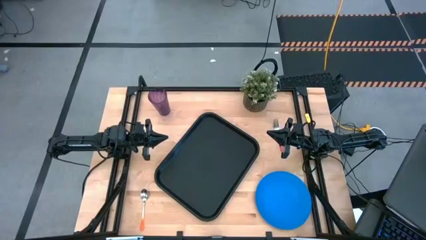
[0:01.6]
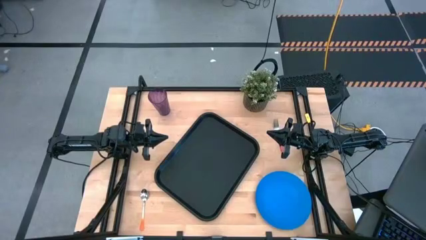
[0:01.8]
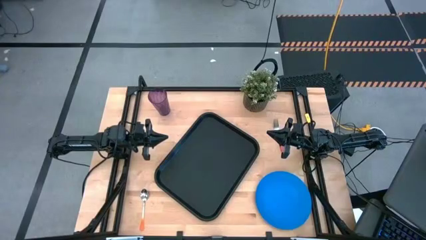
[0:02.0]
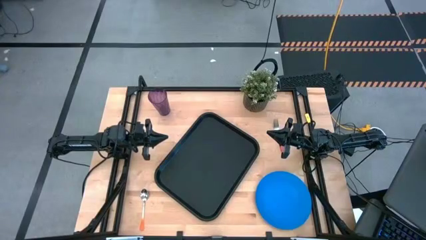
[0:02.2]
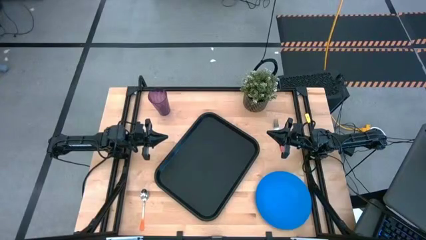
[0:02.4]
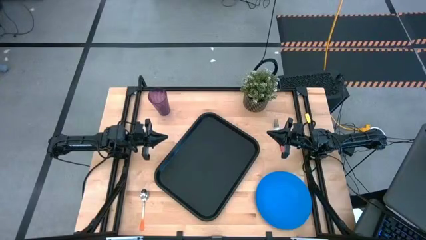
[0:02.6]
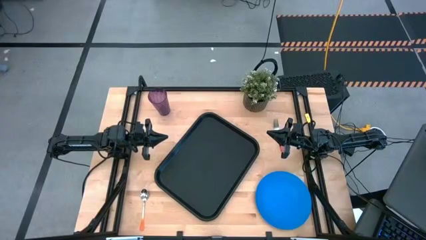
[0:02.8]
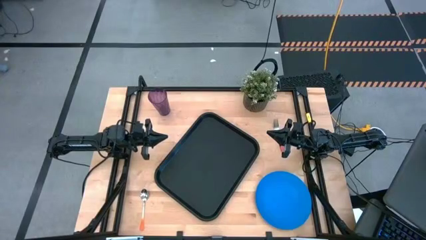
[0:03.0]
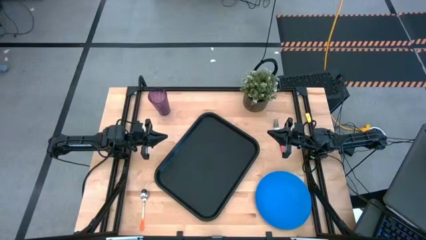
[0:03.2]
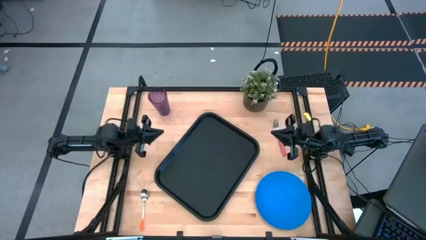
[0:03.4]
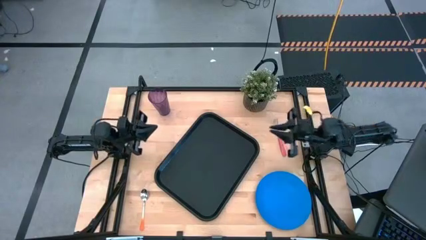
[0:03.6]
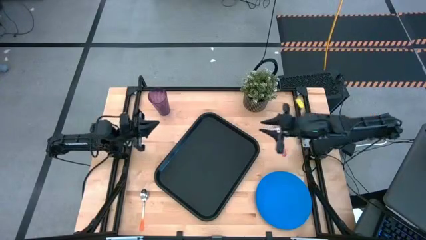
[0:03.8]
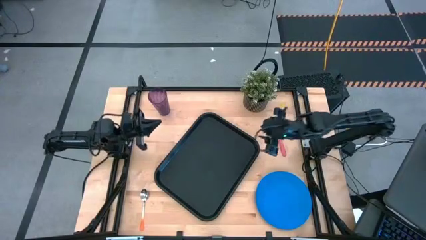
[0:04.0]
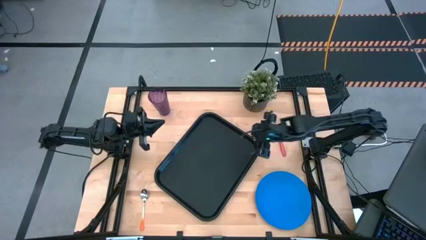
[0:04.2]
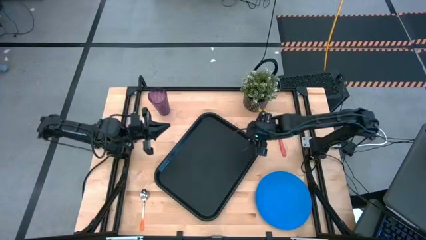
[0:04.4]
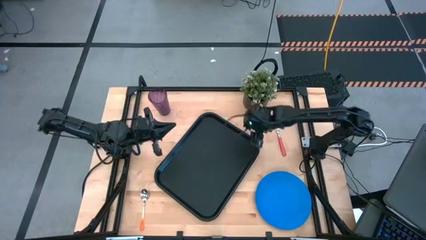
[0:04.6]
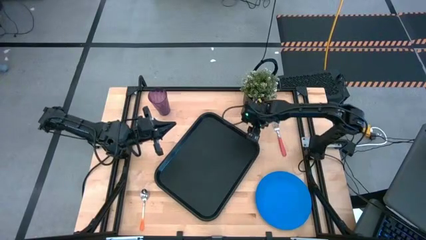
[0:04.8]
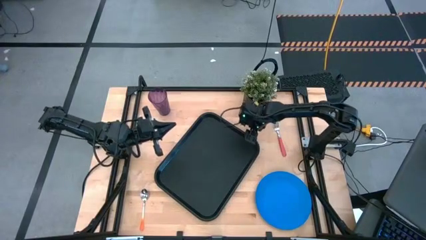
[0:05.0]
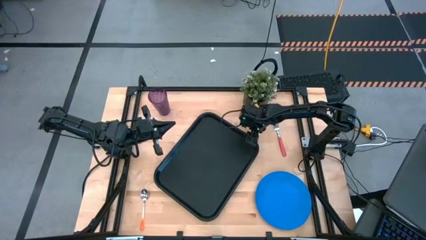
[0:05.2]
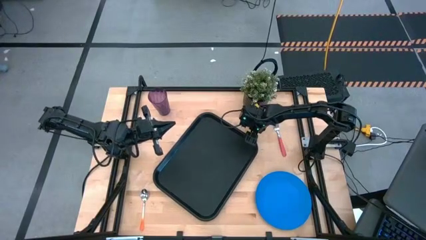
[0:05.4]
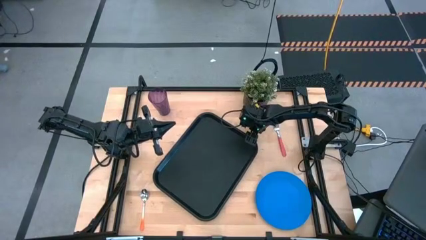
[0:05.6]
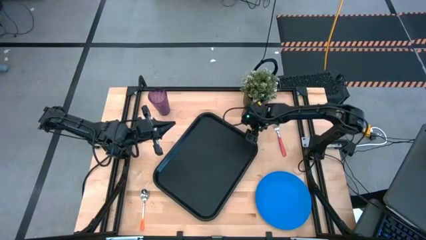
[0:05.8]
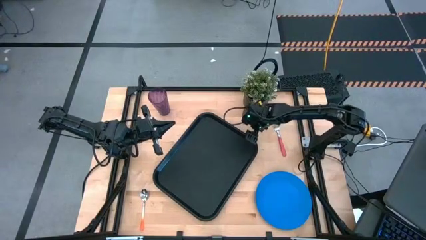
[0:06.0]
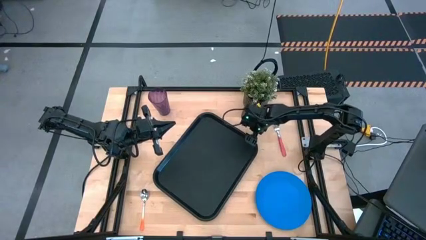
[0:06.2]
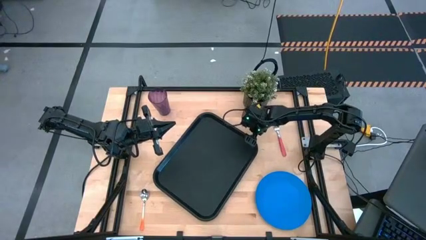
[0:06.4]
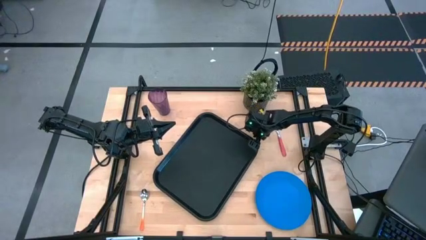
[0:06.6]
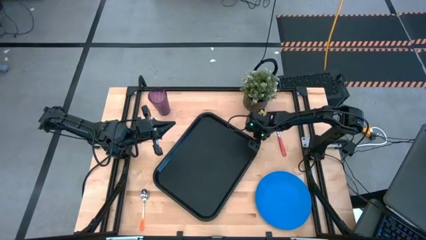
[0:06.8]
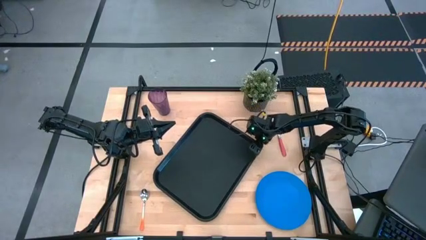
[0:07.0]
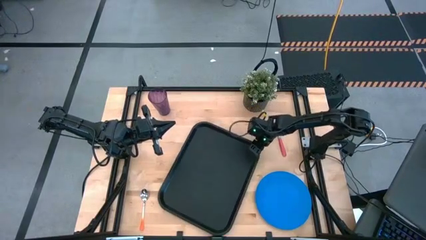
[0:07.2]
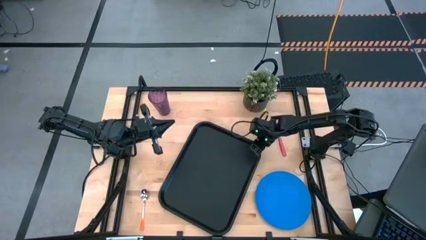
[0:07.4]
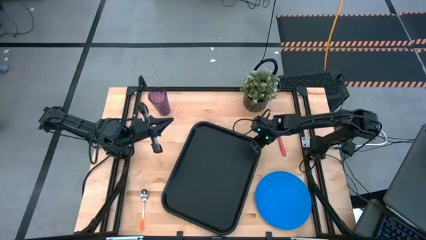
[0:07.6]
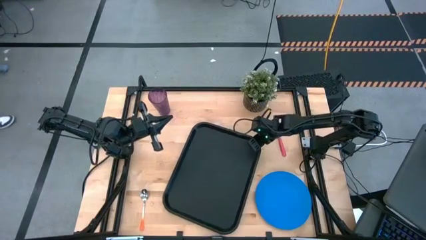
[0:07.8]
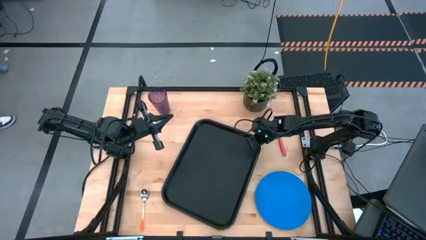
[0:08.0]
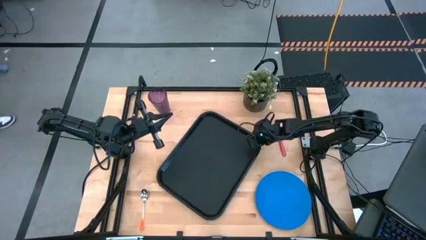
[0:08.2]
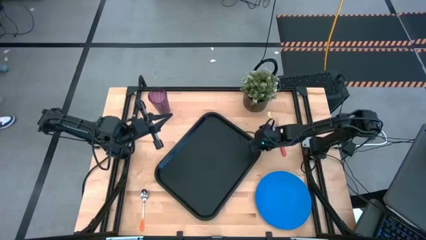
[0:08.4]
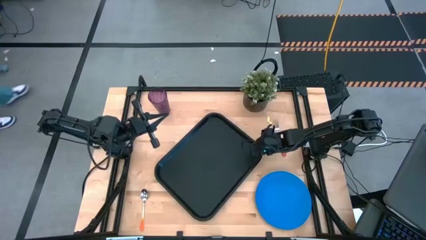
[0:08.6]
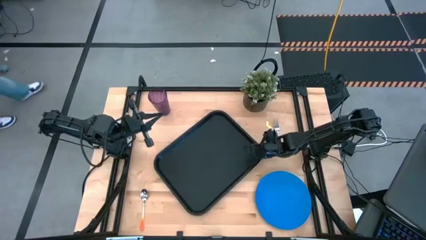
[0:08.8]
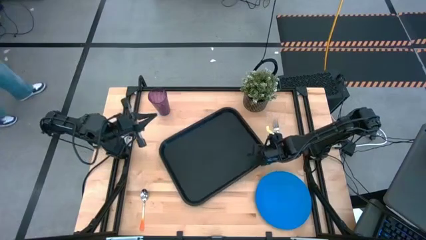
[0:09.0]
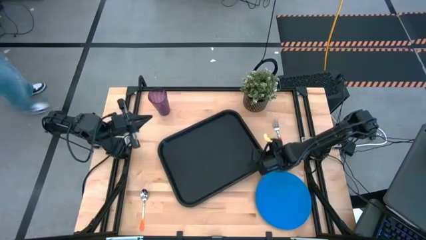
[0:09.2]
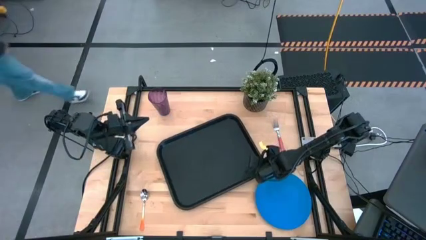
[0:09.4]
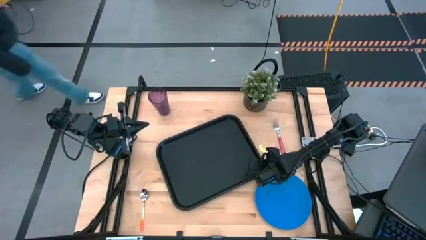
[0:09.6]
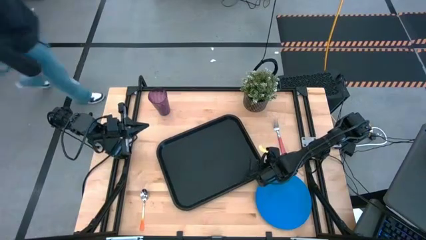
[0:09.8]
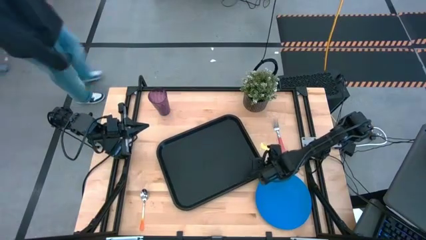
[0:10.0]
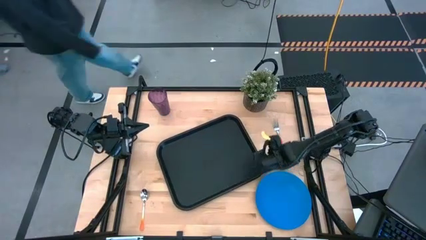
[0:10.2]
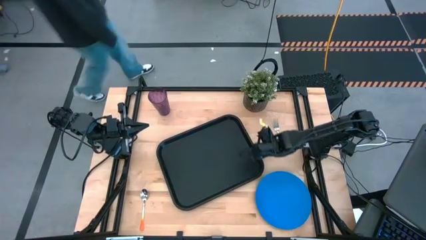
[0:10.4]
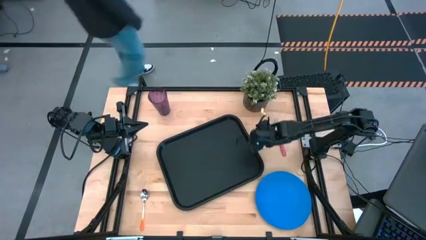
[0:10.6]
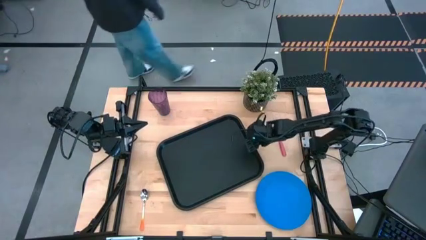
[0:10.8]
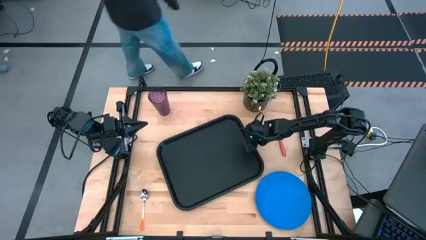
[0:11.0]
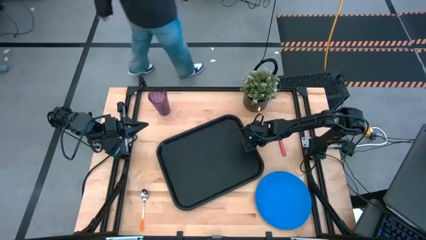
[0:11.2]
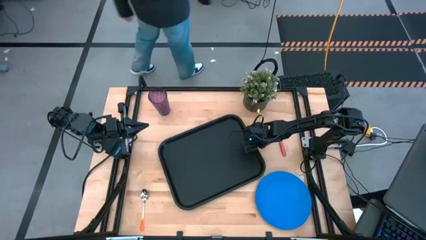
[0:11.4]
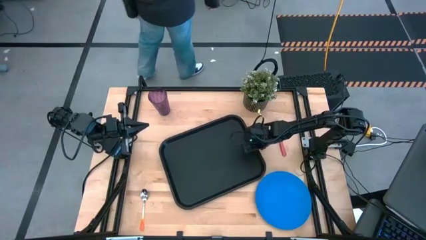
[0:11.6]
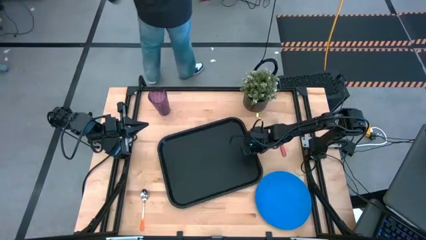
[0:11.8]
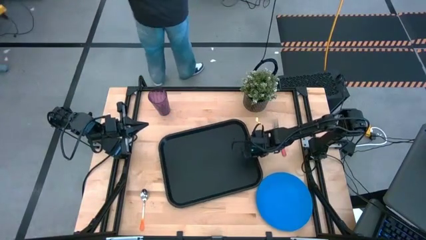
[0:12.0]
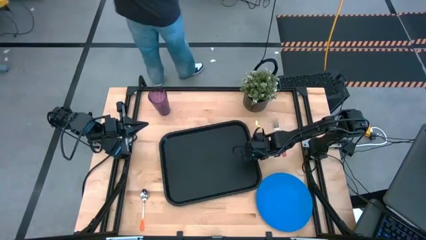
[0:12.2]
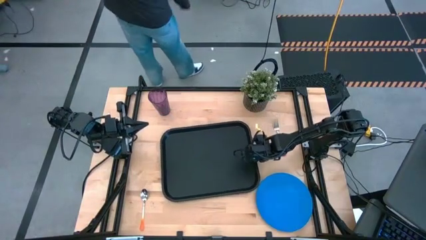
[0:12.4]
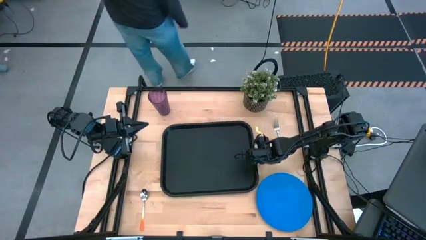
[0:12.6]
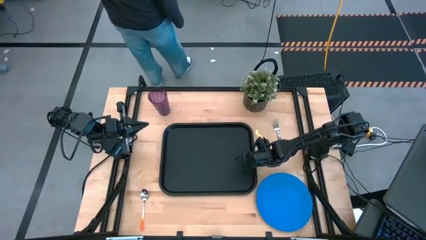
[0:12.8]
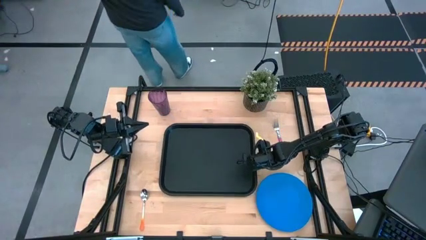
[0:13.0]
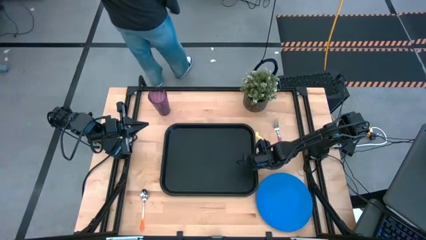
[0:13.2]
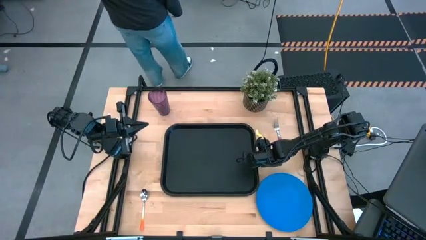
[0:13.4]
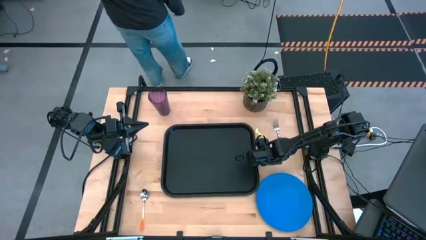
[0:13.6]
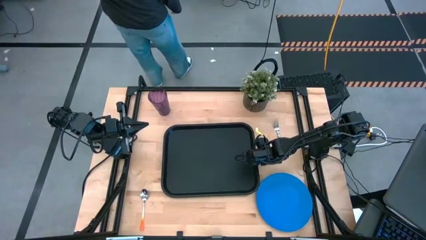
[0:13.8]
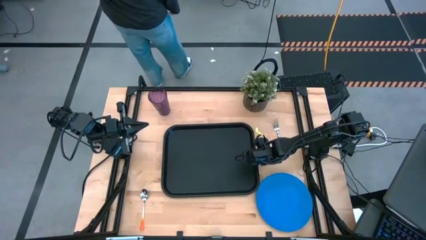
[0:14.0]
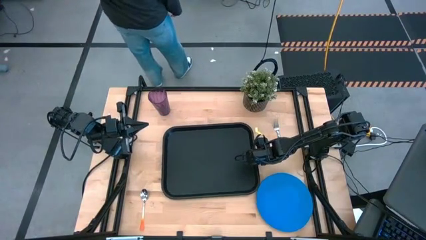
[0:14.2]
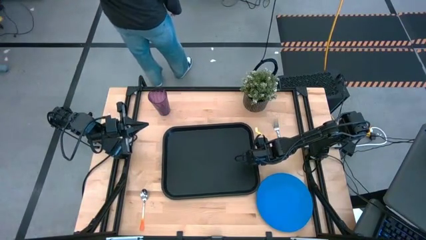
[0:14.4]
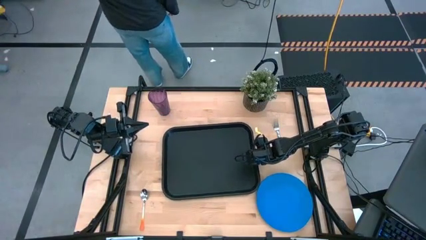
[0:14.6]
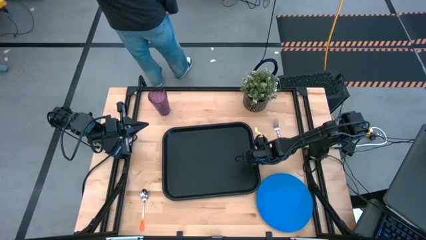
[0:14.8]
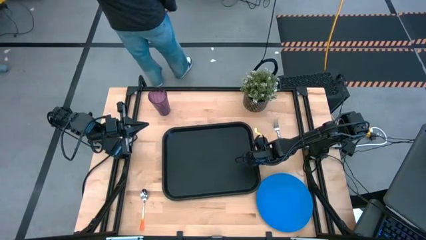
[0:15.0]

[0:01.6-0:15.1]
Task: Pick and place plate/cup/fork/spoon on tray
Prepare the black serving tray
